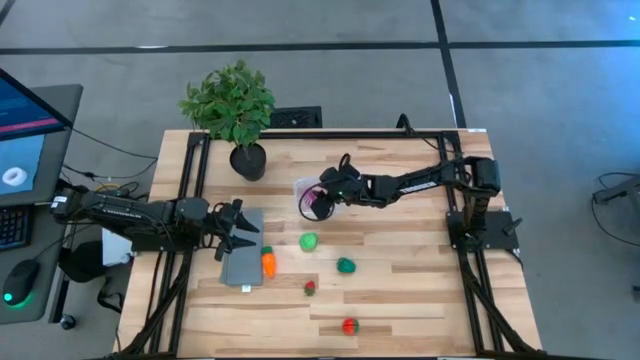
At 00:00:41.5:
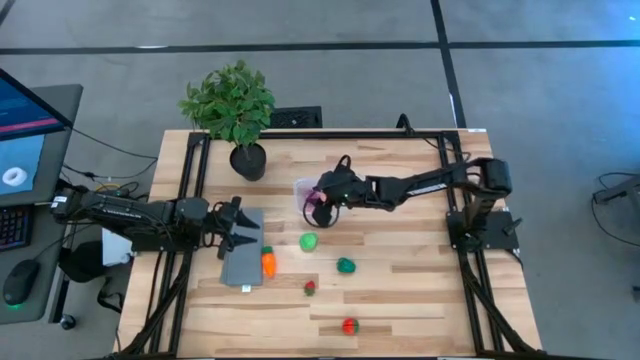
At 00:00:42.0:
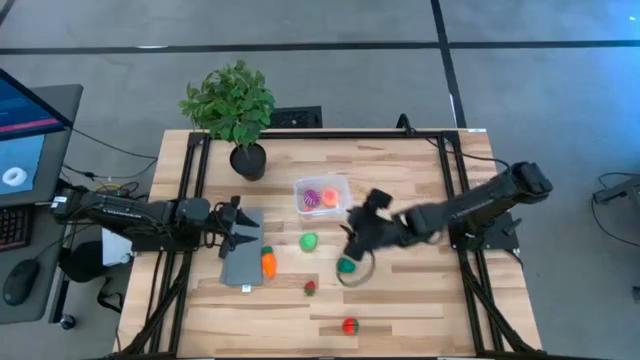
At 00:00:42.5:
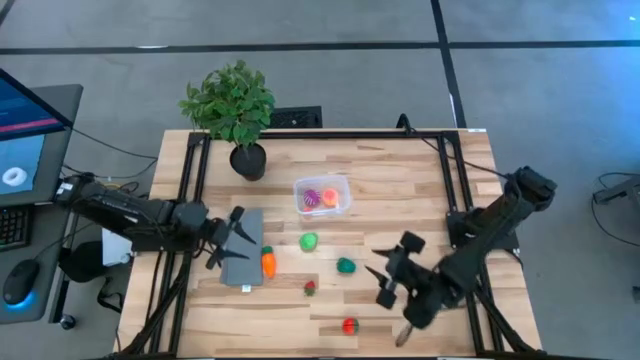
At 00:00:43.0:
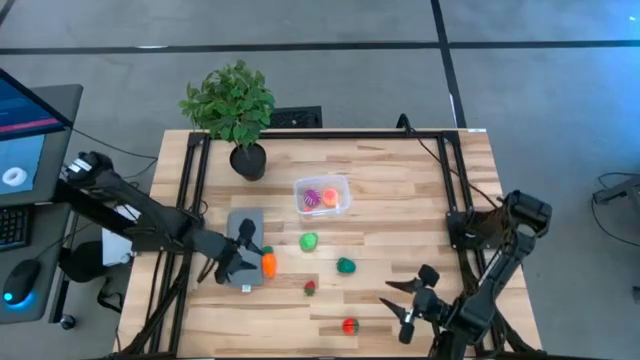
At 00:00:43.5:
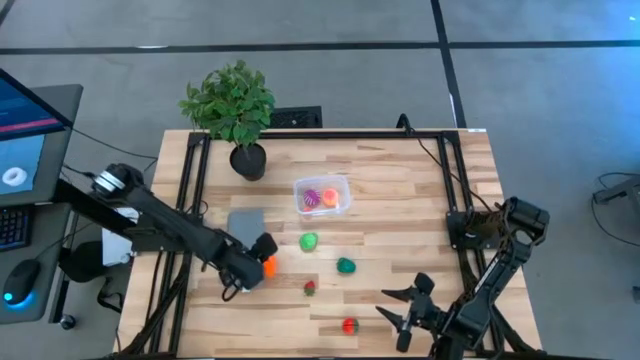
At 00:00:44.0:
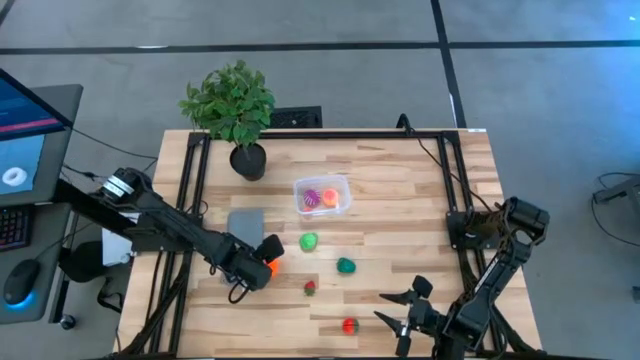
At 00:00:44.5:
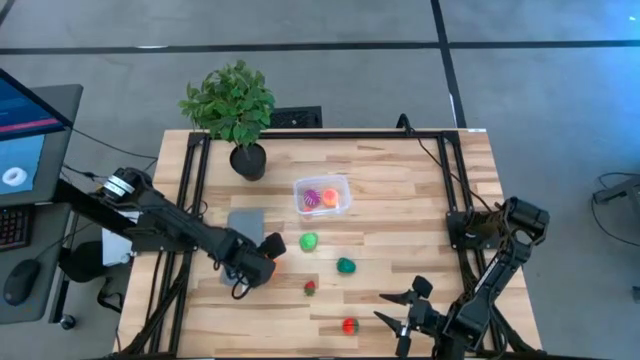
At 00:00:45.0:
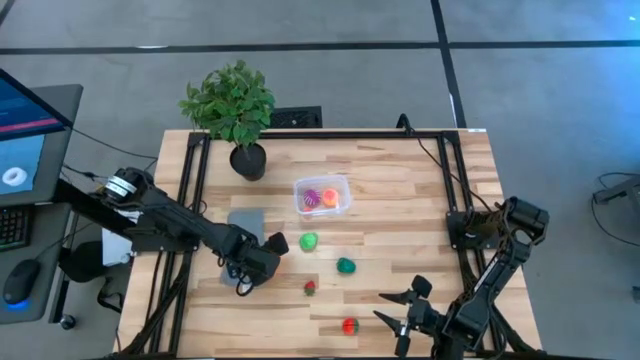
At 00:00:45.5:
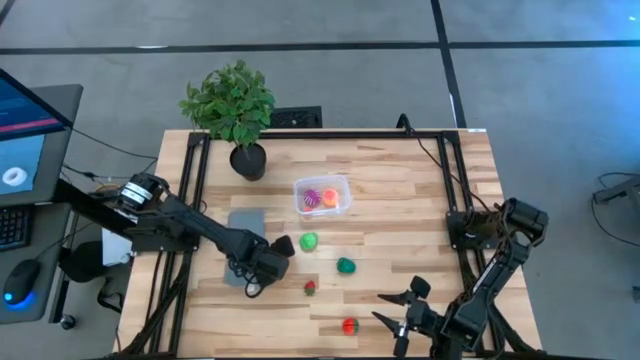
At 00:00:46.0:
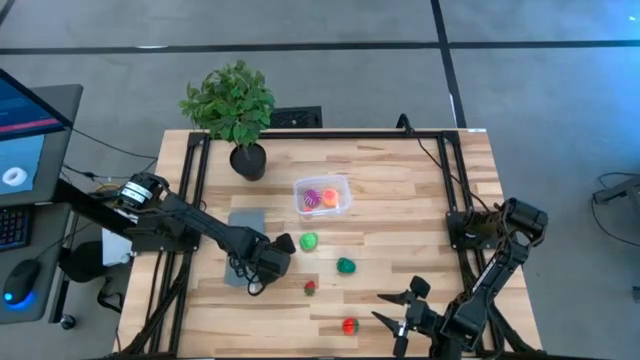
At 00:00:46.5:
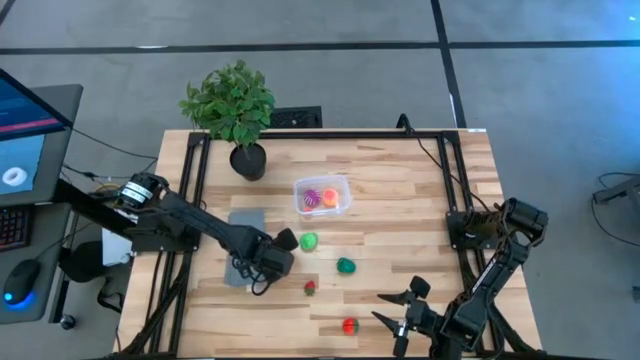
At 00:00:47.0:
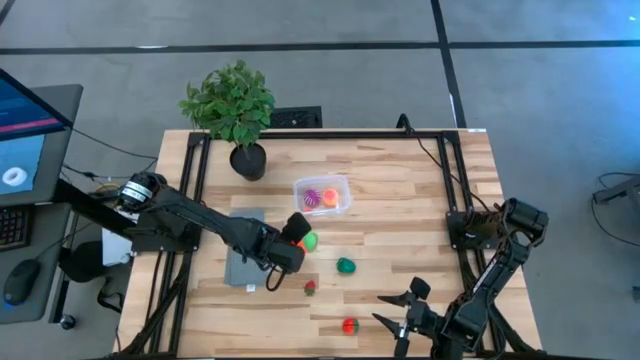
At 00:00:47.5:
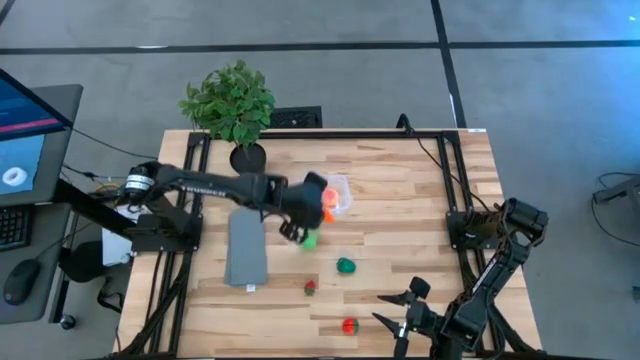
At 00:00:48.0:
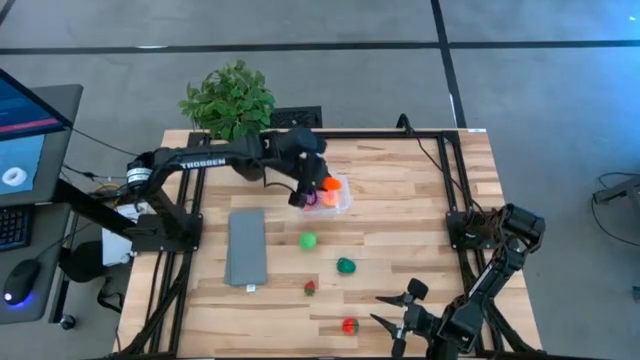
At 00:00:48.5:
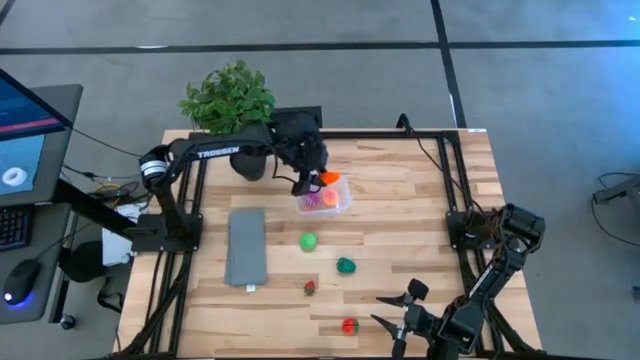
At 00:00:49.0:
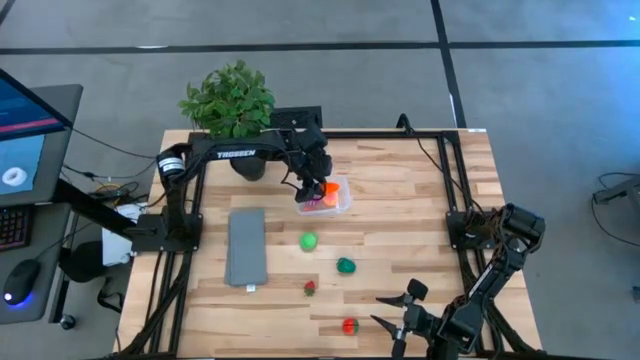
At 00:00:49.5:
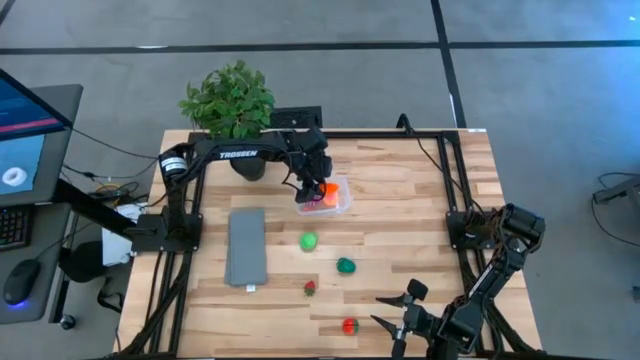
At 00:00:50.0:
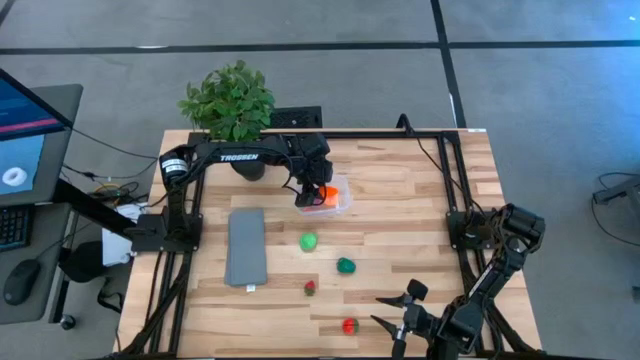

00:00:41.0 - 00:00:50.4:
Task: Pick and placing Produce into tupperware
Put the carrot into the transparent container

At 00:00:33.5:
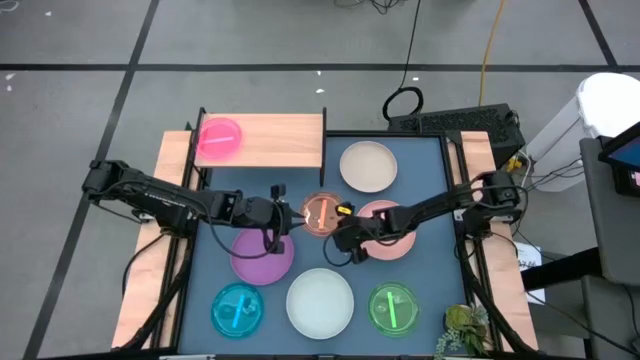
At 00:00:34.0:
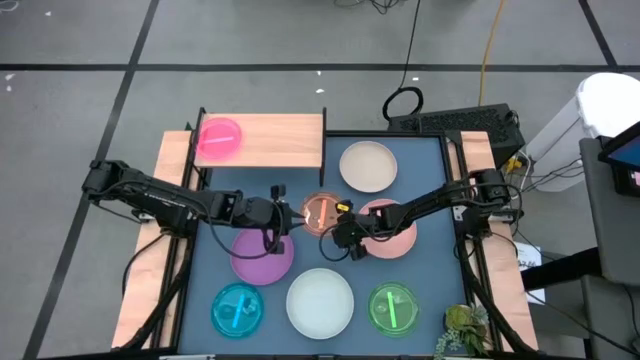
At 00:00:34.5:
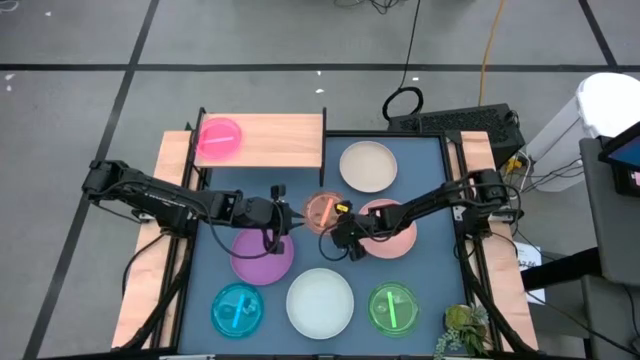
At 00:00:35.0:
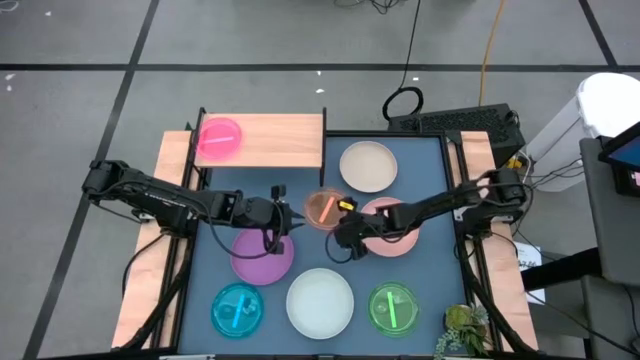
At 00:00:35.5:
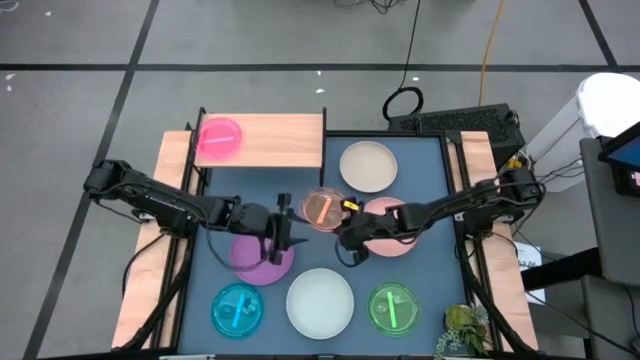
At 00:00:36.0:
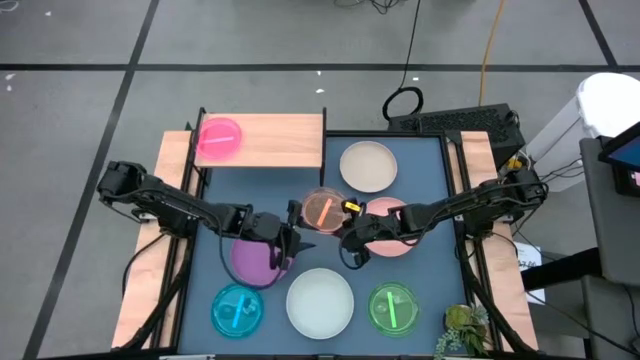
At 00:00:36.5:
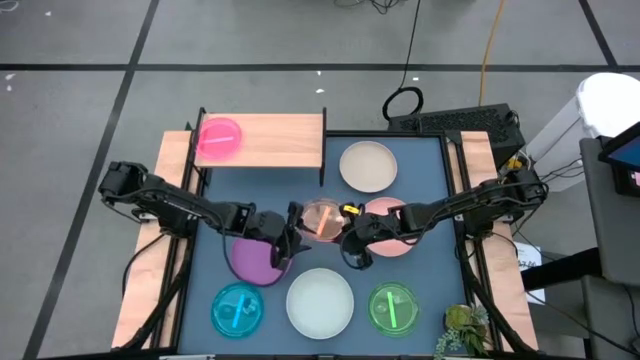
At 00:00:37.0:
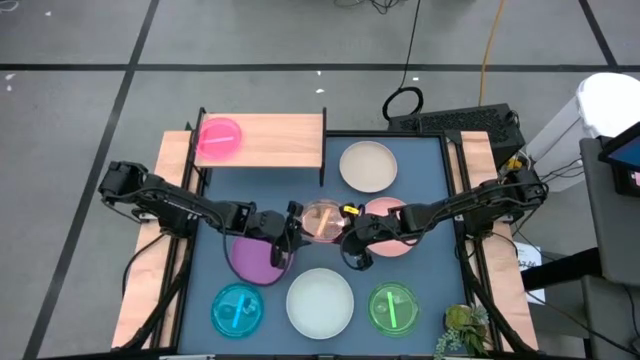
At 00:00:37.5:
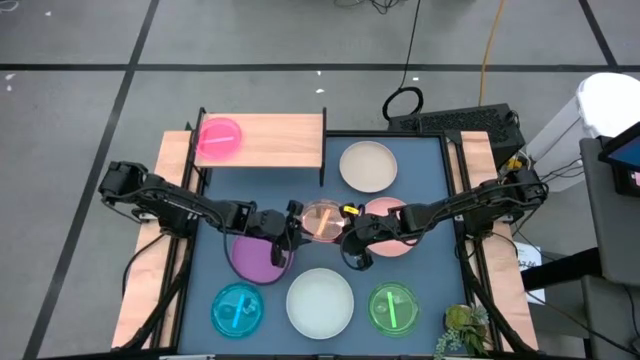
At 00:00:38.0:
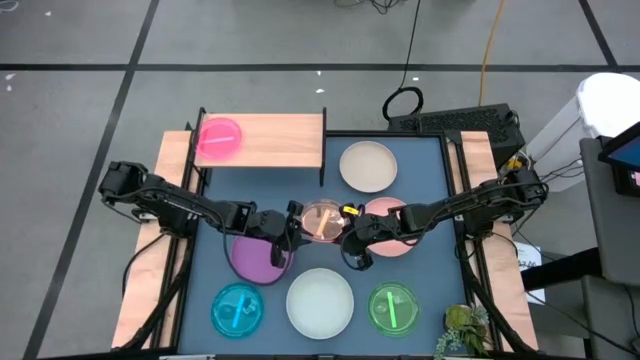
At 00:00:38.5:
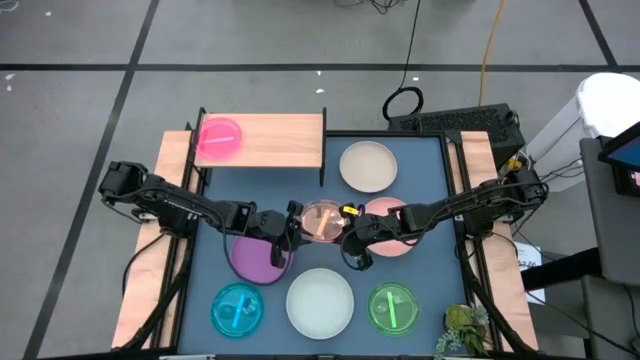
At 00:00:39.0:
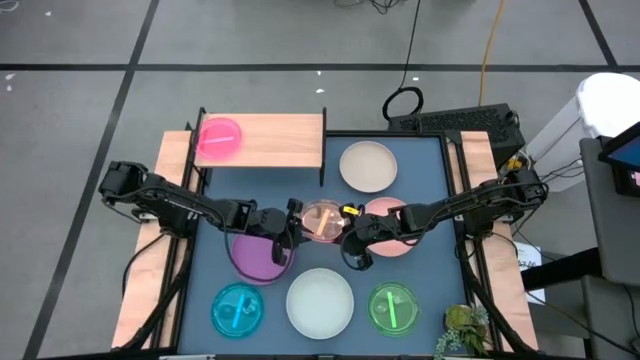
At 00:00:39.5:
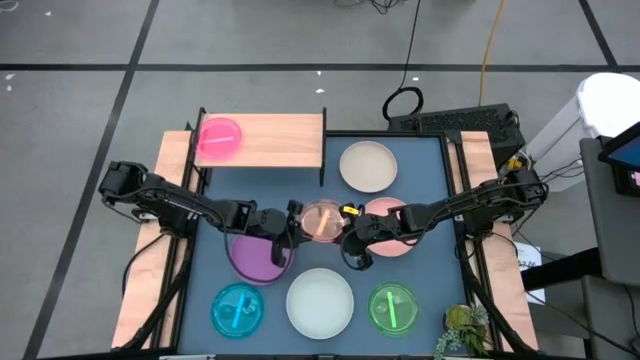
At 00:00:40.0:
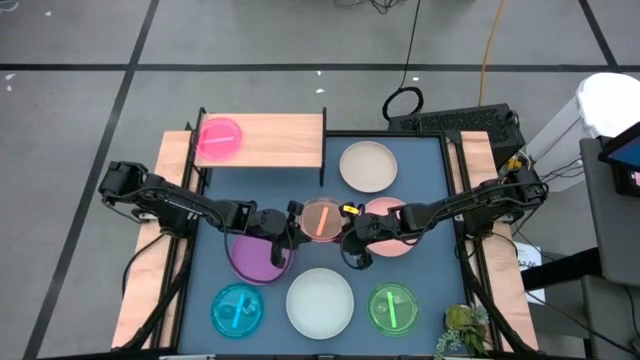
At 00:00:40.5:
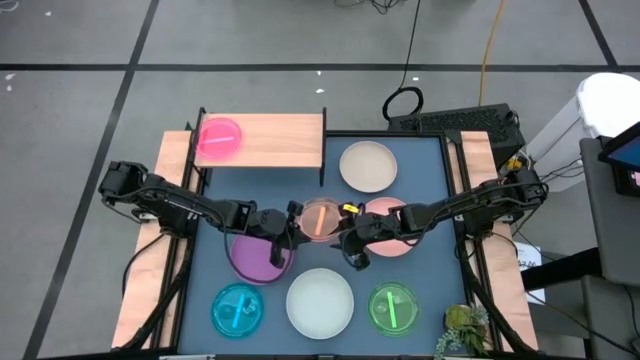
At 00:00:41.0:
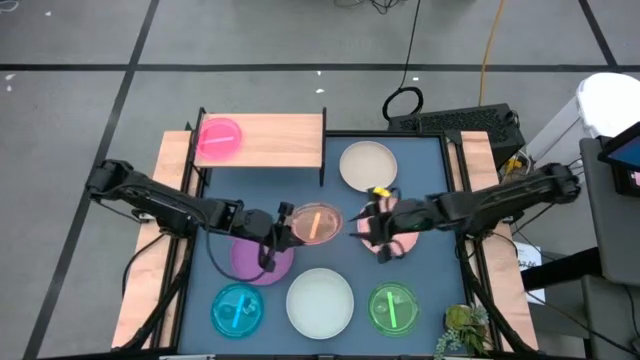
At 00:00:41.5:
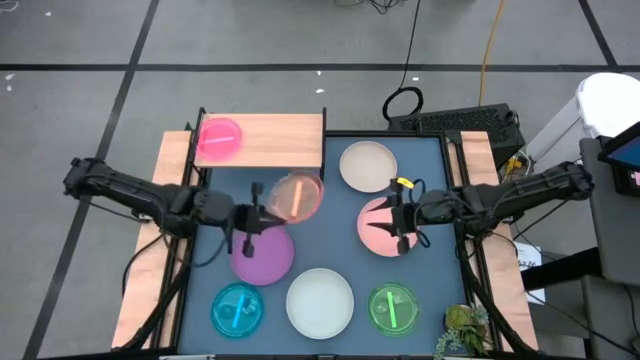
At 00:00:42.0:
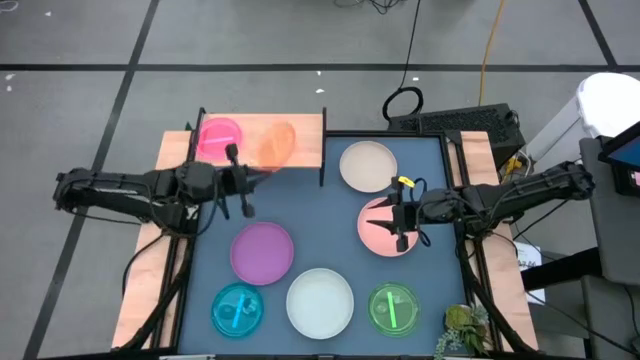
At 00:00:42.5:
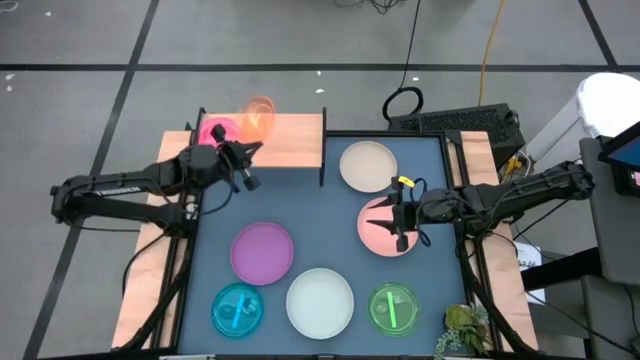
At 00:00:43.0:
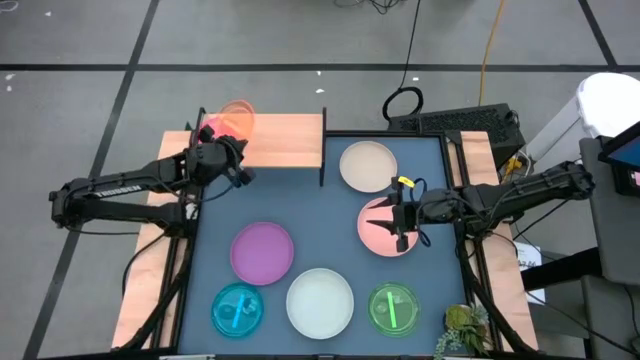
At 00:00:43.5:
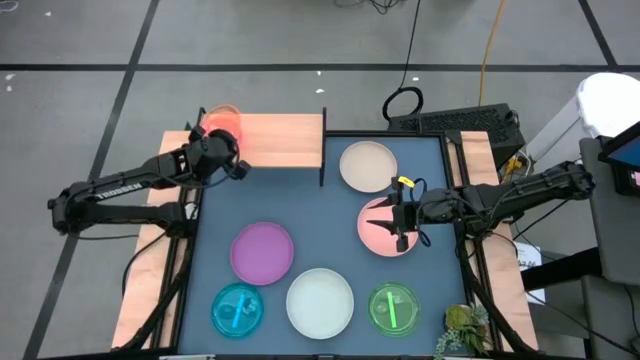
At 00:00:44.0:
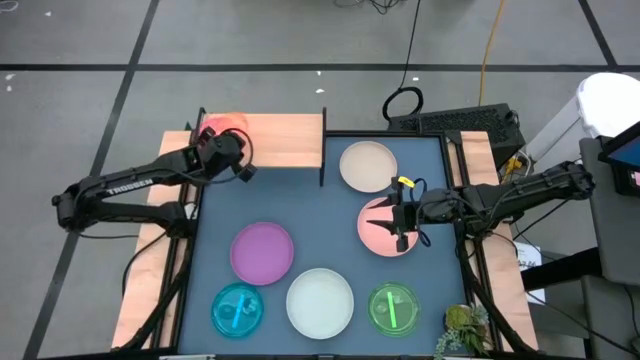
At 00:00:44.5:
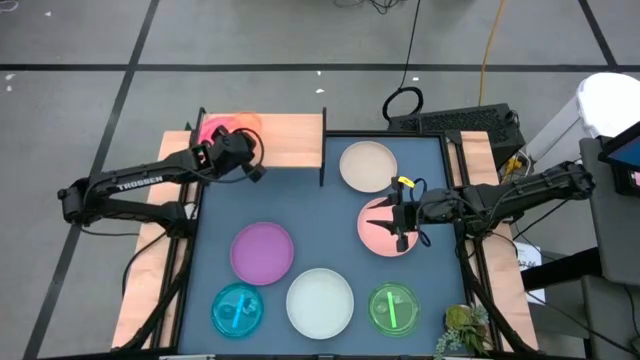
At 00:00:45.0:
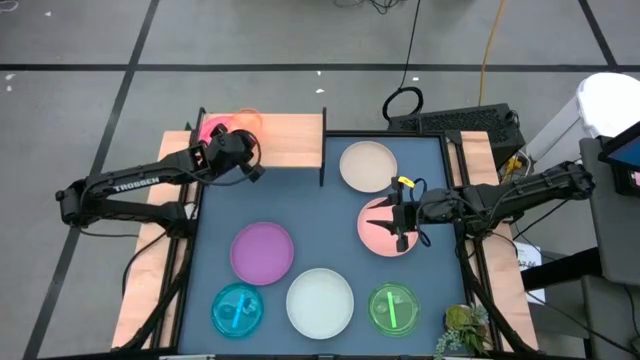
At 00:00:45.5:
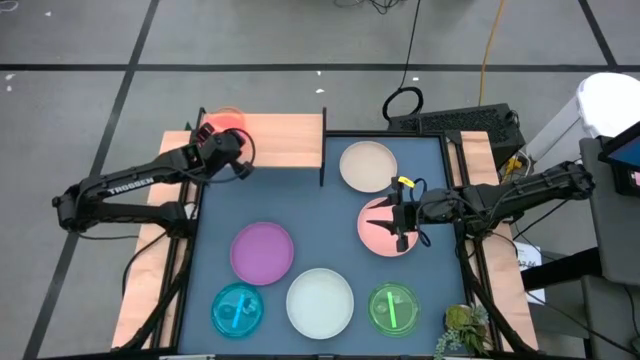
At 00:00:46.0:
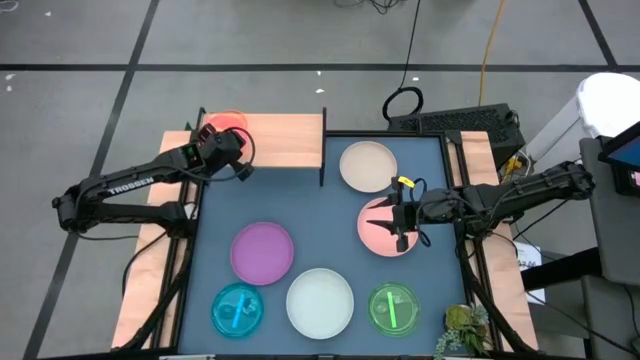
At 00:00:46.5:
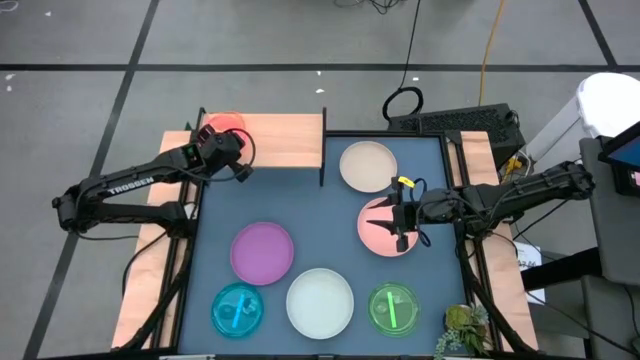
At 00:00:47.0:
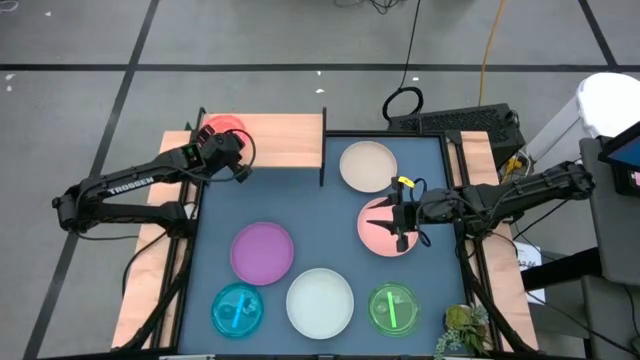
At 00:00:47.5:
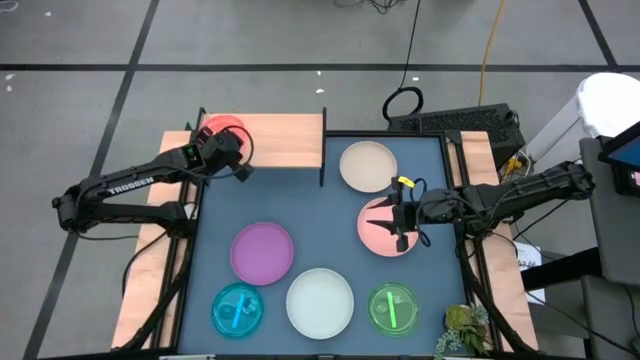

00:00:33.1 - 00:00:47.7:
Task: Place and stack plates onto a shelf
Stack the orange plate on top of the light pink plate on the shelf
